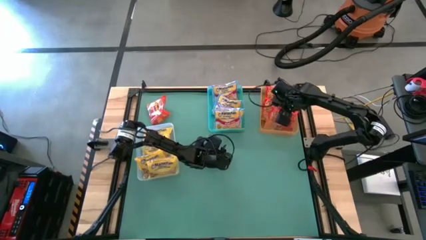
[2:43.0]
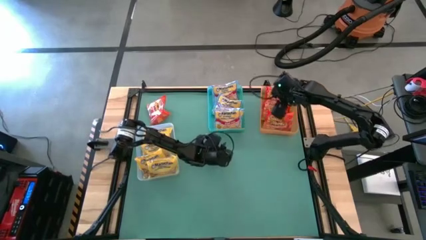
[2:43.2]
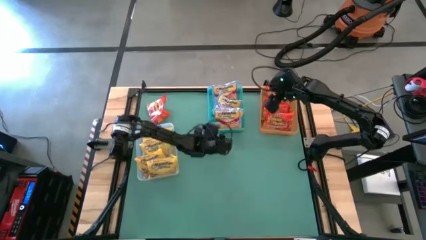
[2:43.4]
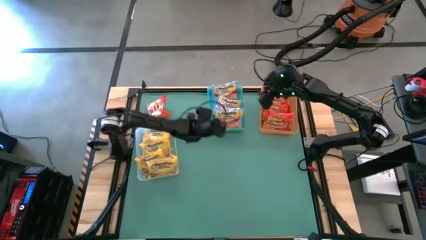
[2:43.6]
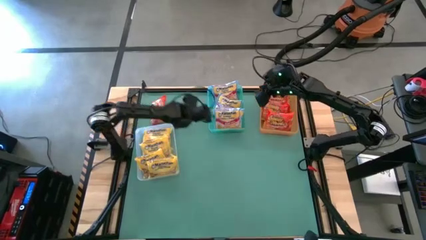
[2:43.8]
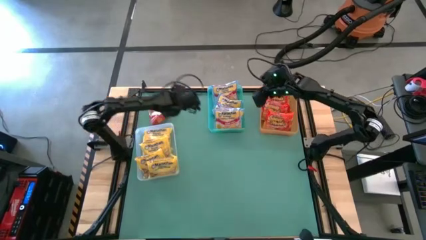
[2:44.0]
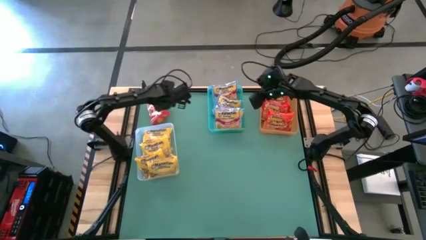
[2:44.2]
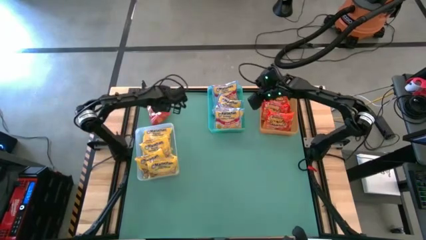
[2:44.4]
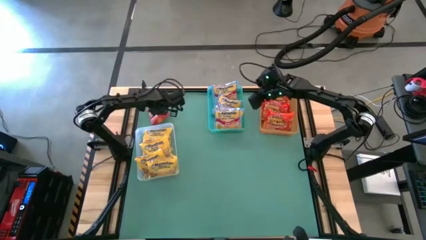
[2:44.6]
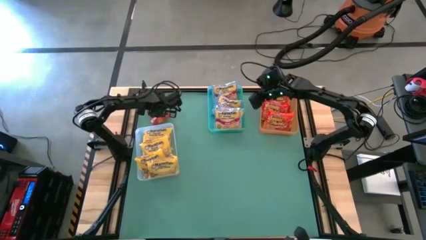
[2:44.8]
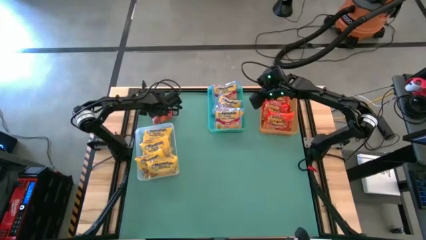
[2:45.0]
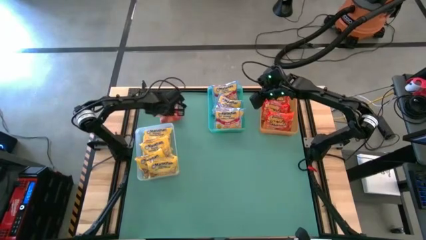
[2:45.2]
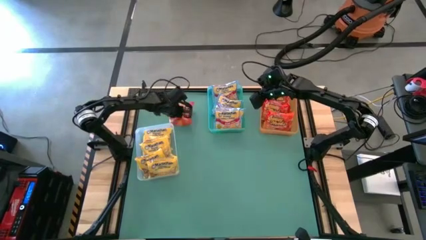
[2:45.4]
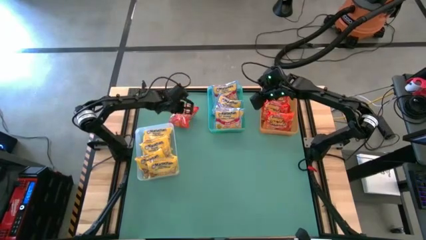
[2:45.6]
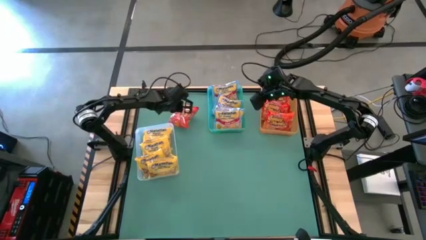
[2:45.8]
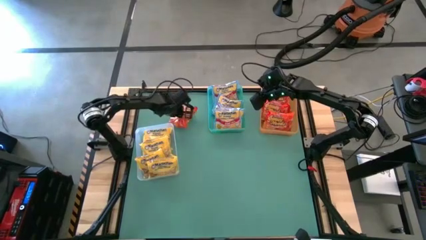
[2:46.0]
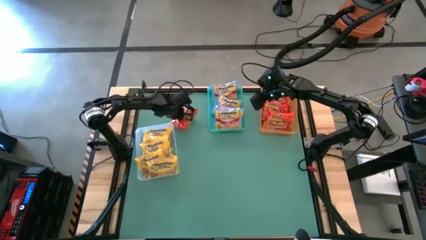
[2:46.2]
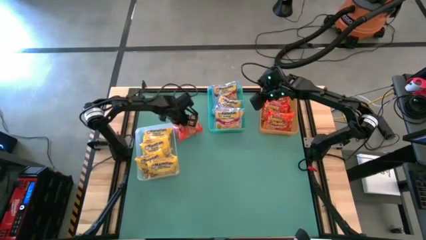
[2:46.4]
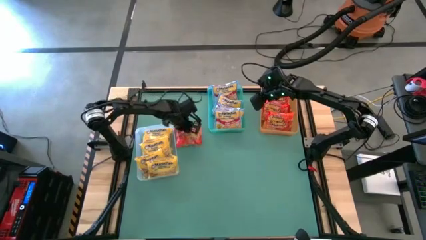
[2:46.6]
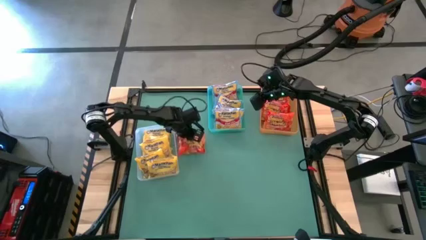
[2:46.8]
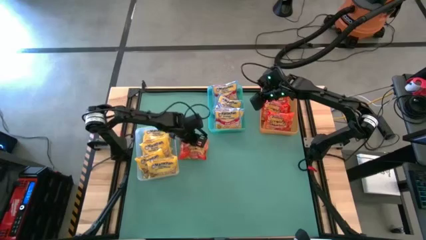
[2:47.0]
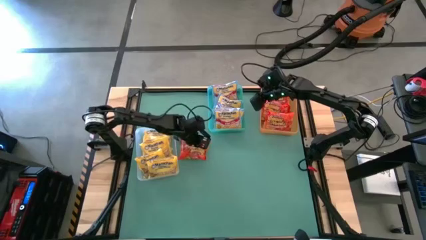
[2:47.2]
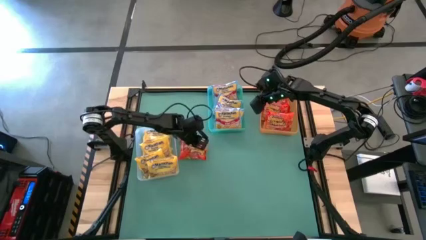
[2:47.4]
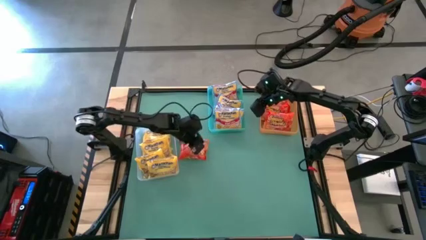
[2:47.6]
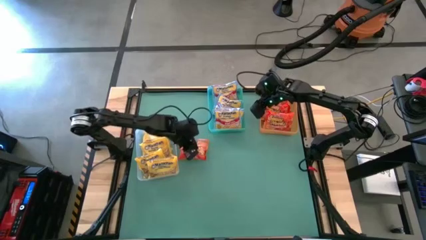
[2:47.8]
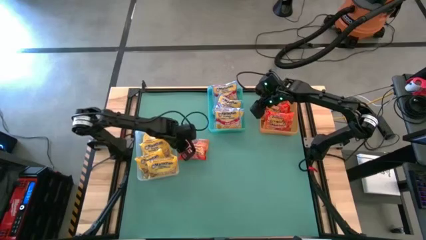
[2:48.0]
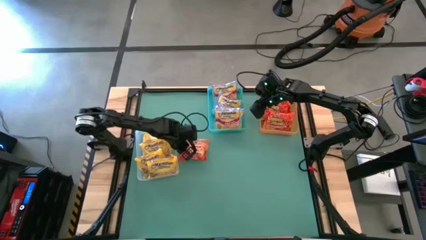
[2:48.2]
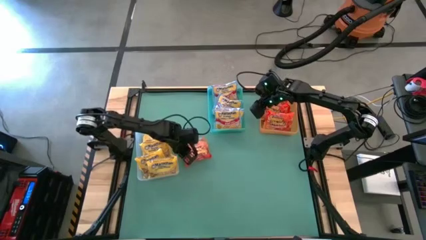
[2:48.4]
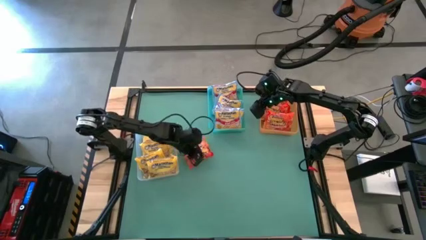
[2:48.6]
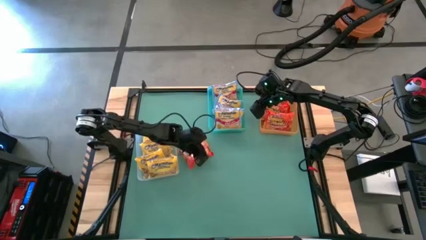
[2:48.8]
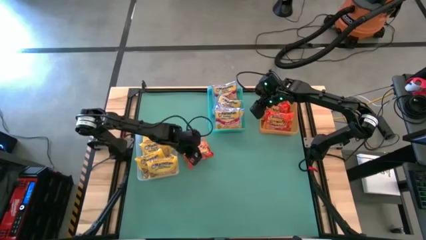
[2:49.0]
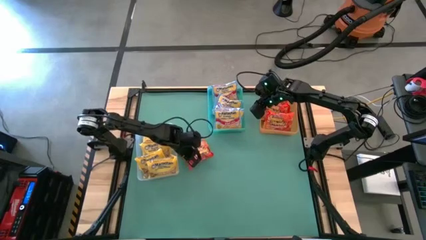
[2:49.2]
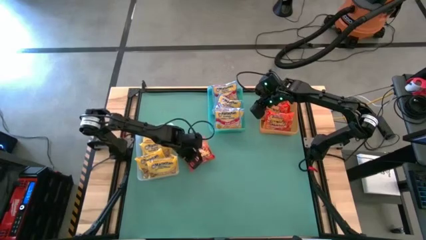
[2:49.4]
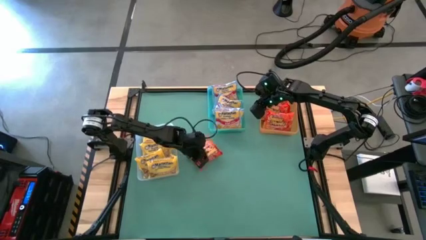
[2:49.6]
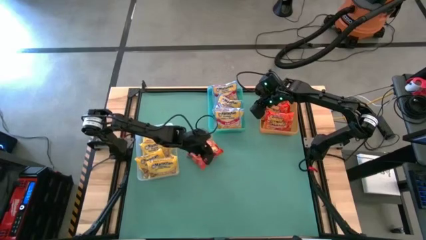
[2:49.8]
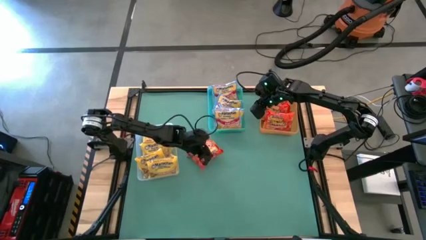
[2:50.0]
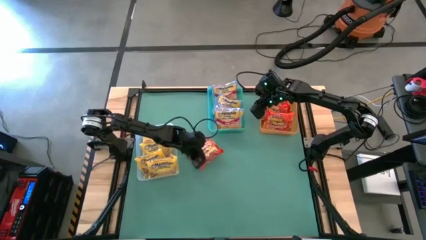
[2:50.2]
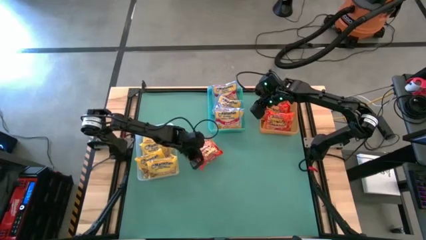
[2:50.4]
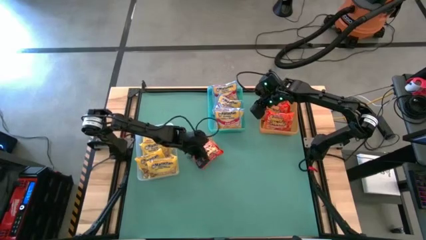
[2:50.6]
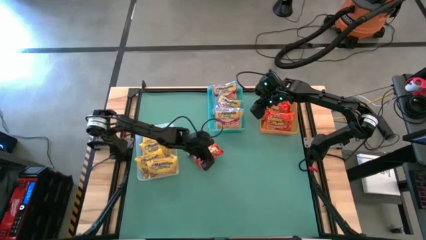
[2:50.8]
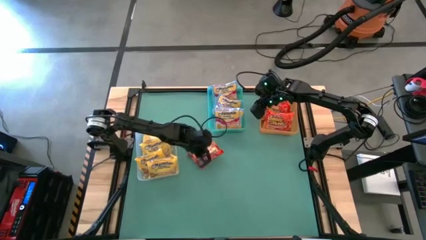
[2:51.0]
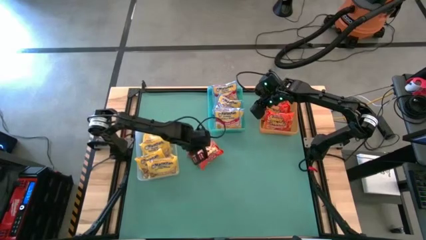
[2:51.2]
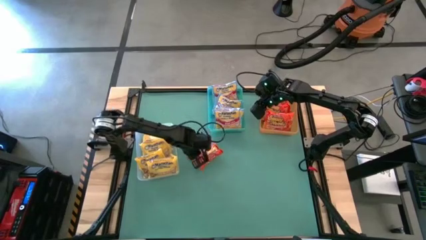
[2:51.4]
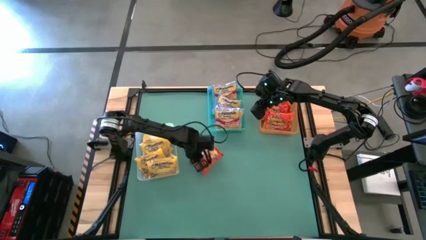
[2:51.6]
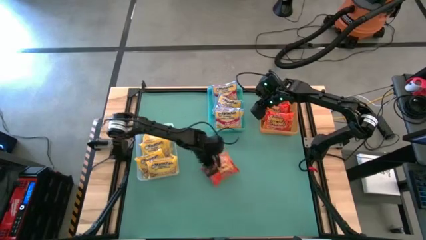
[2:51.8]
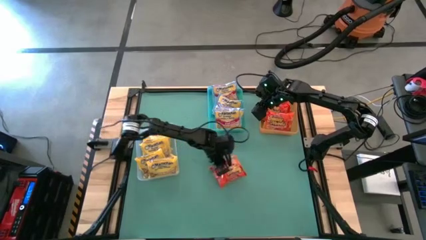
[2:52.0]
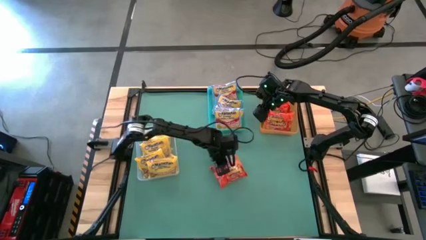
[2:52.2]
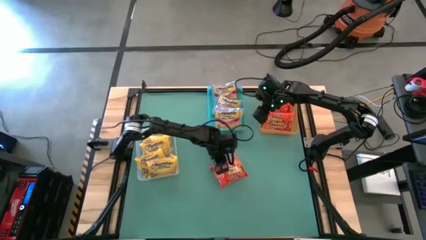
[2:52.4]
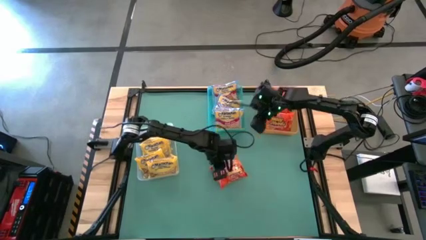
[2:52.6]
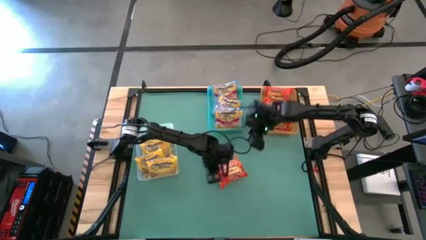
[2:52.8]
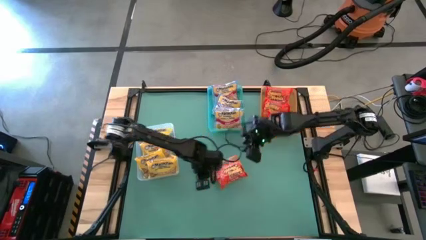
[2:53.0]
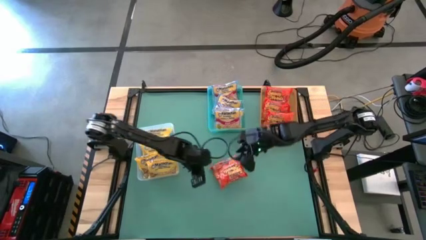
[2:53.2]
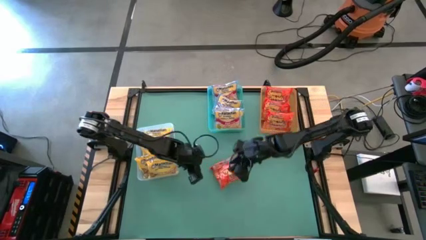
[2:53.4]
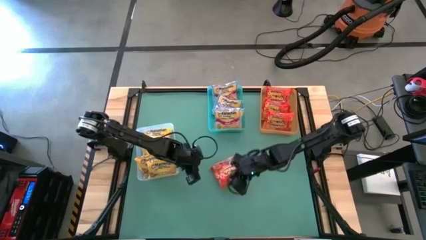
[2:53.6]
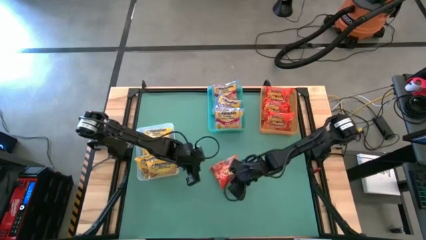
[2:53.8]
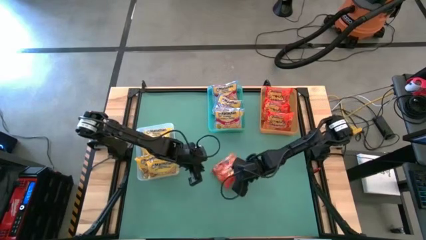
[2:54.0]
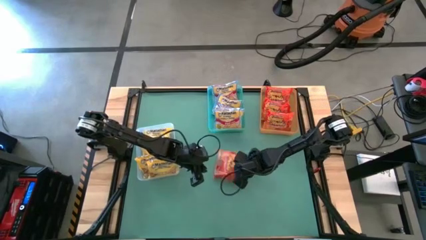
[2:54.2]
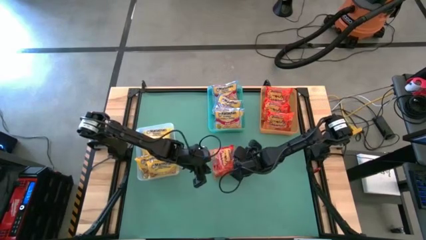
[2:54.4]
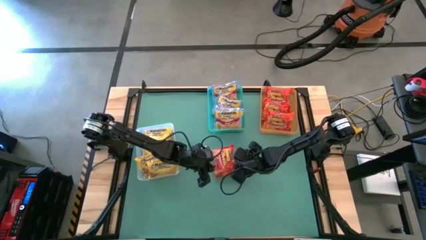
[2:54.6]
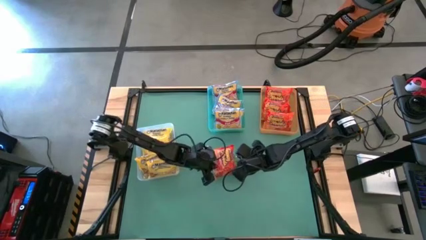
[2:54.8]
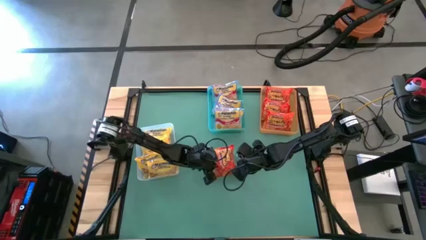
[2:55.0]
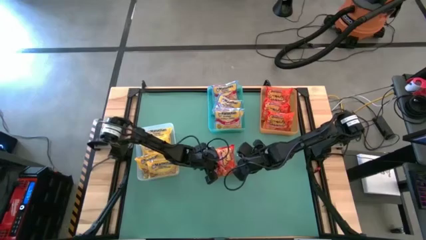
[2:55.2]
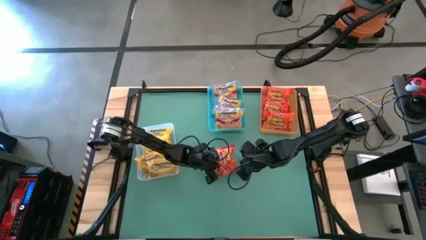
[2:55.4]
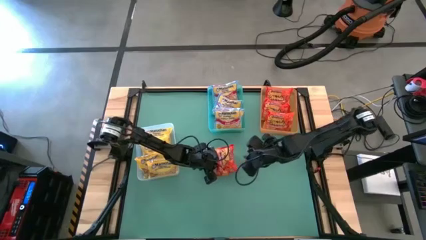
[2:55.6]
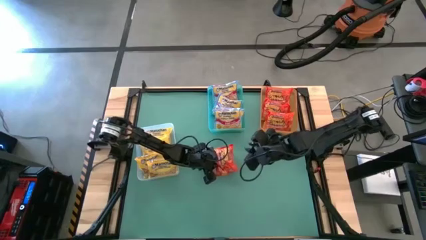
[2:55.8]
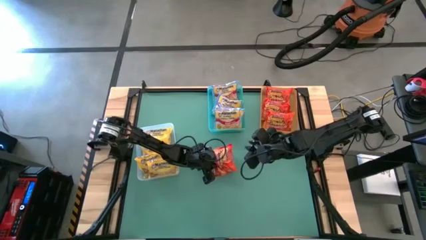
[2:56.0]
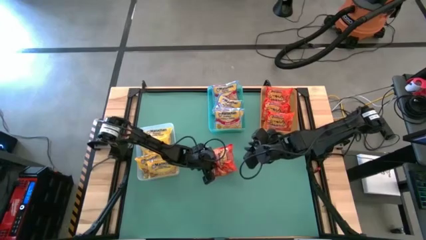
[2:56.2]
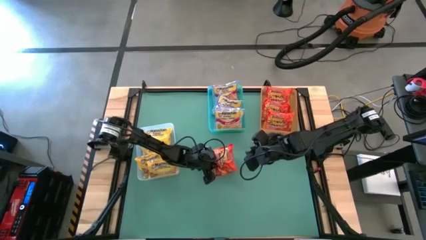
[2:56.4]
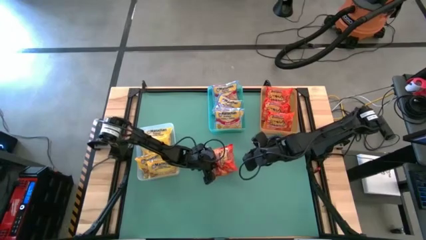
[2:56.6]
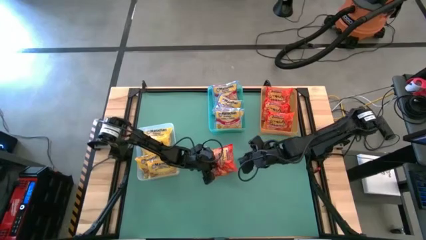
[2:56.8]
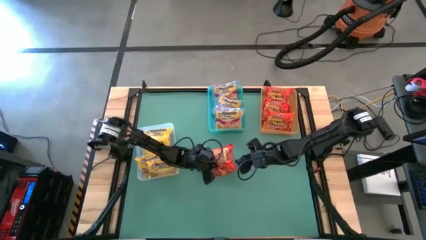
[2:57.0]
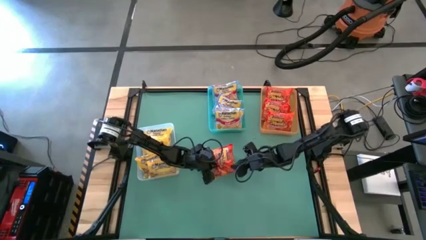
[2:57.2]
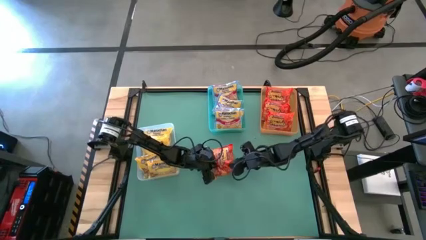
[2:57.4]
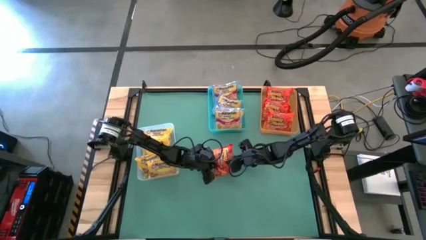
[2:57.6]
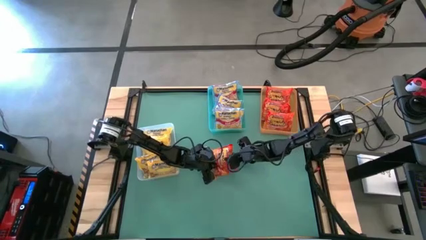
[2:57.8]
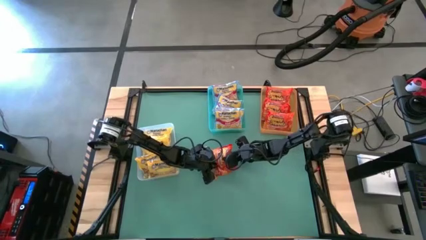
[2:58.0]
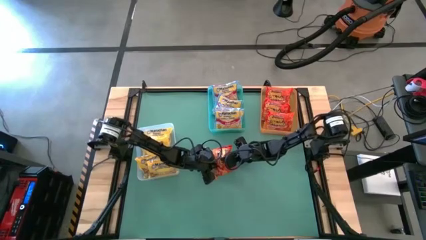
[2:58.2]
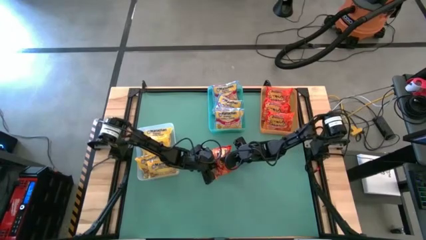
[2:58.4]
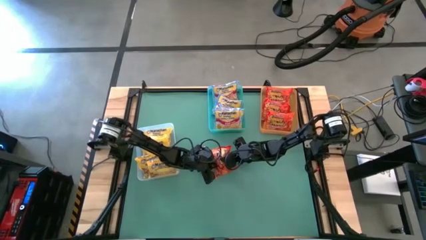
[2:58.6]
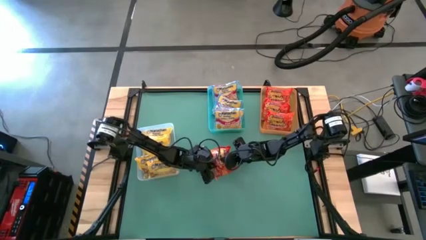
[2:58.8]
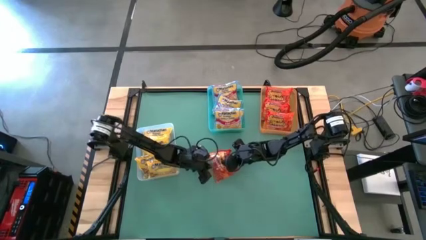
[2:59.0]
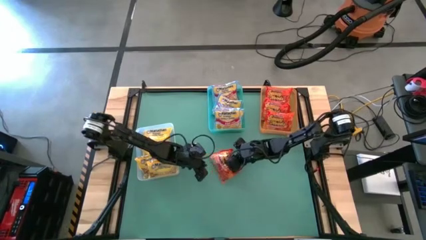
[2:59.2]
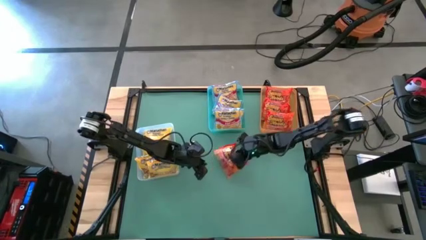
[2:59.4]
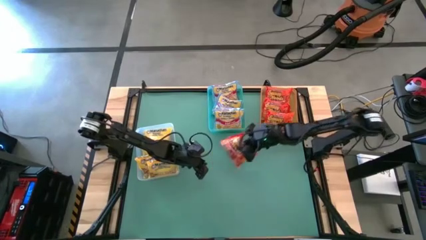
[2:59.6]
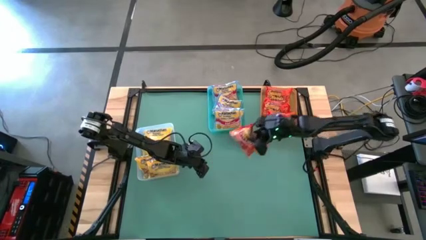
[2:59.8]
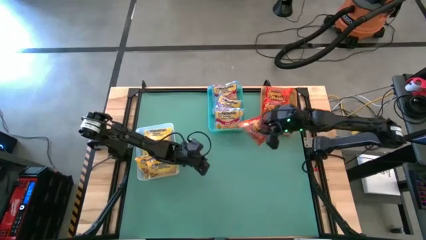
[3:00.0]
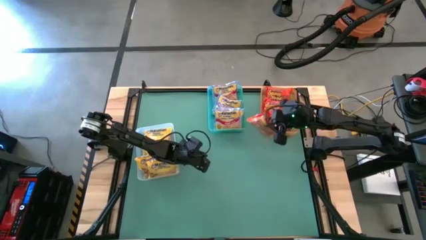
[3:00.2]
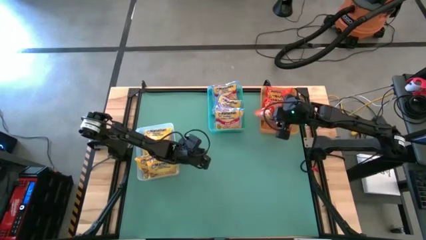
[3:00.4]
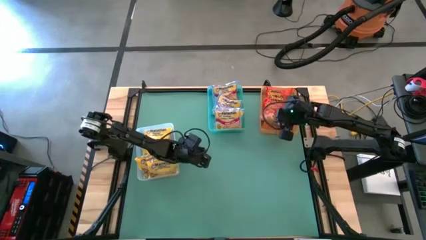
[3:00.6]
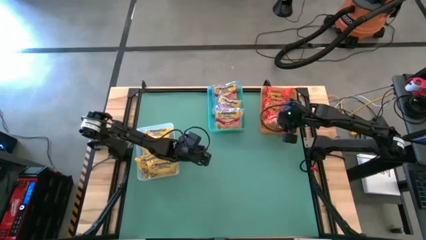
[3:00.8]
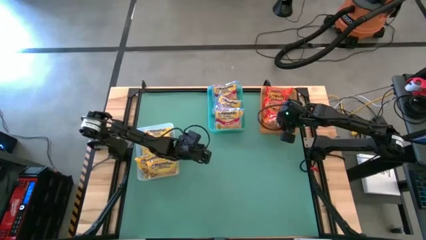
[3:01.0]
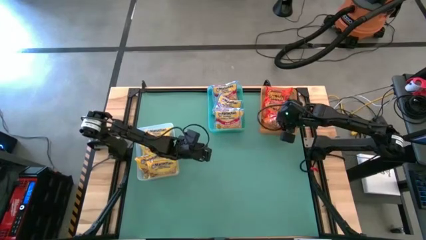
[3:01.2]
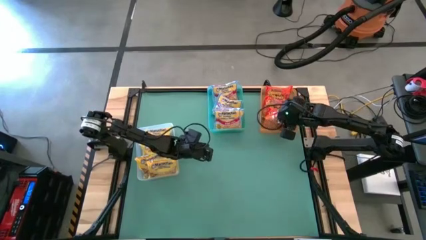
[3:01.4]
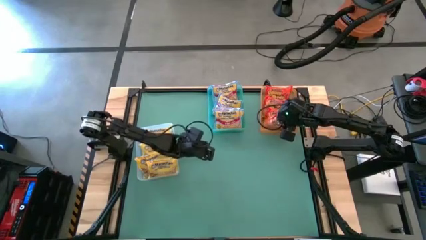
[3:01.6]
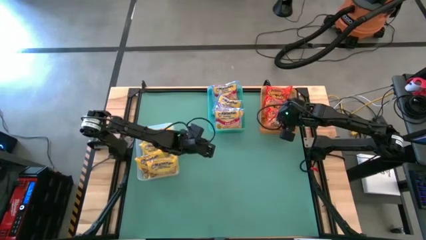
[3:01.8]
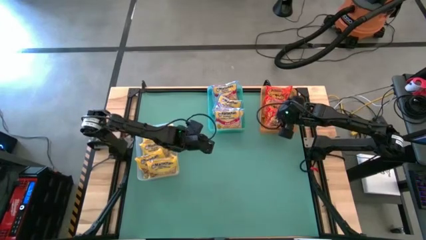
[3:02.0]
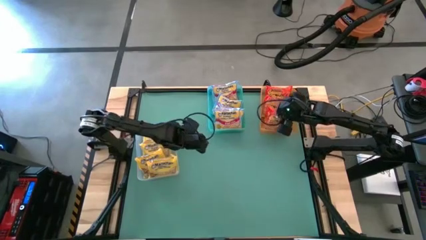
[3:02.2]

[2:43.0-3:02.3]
Task: Sort Maruchan noodles
Put the orange noodle pack into the orange bin
